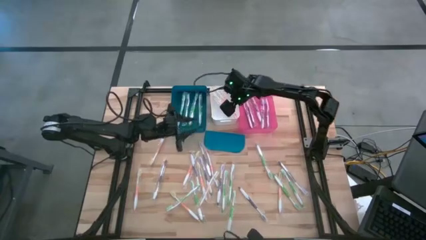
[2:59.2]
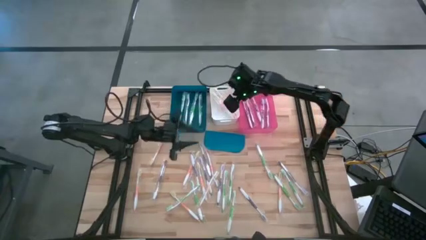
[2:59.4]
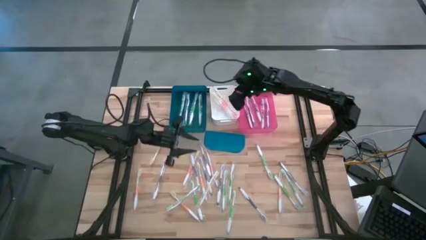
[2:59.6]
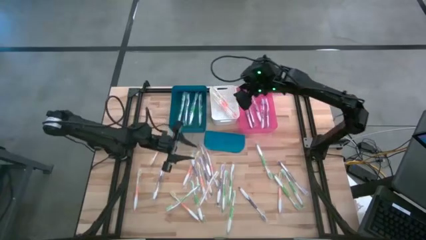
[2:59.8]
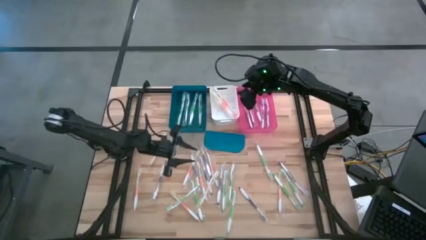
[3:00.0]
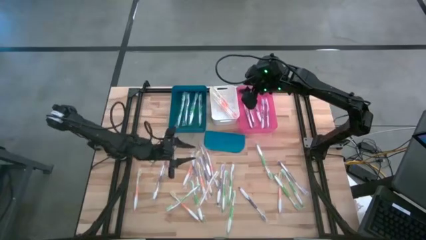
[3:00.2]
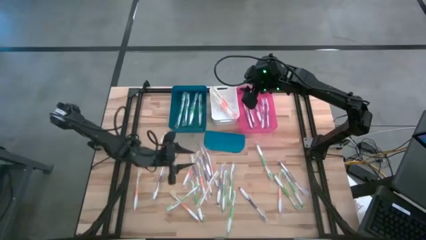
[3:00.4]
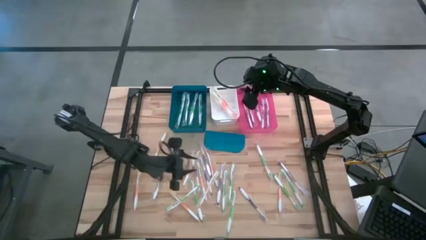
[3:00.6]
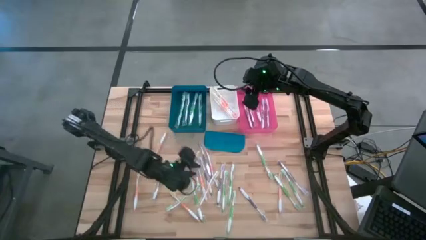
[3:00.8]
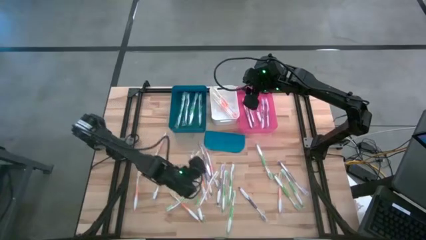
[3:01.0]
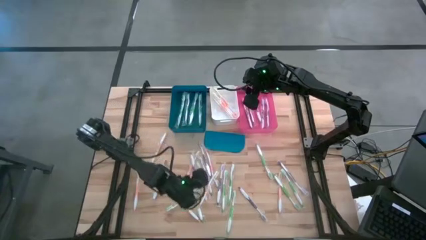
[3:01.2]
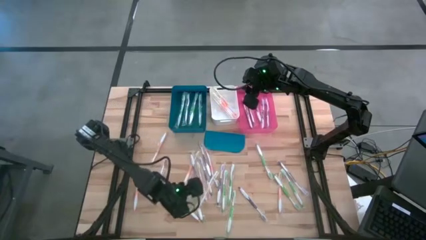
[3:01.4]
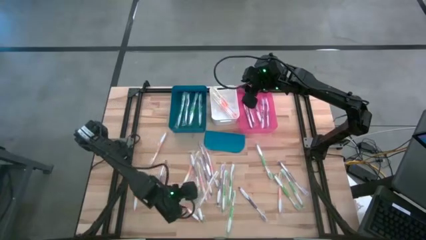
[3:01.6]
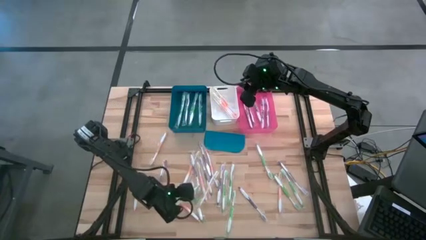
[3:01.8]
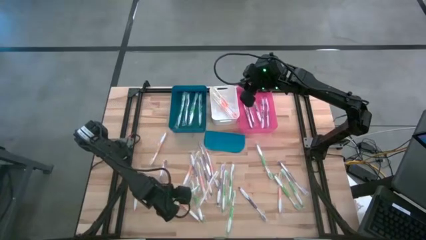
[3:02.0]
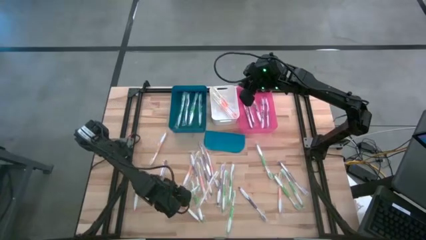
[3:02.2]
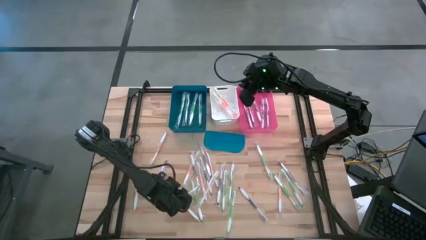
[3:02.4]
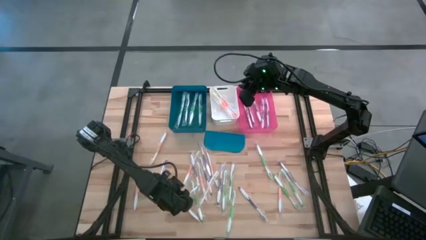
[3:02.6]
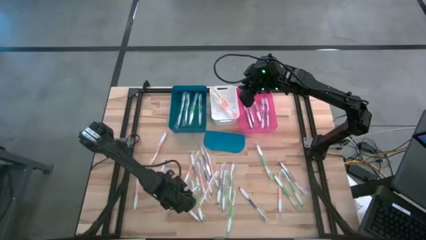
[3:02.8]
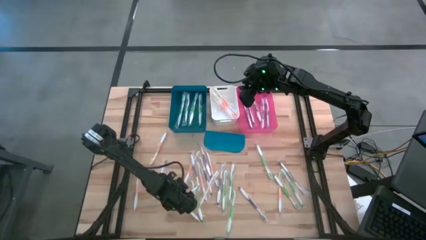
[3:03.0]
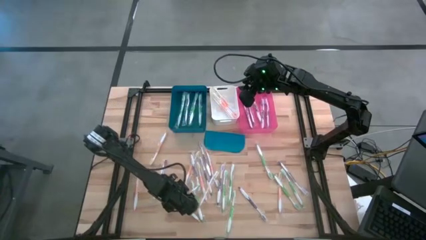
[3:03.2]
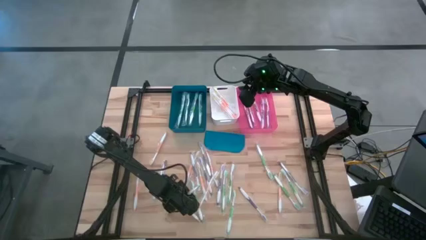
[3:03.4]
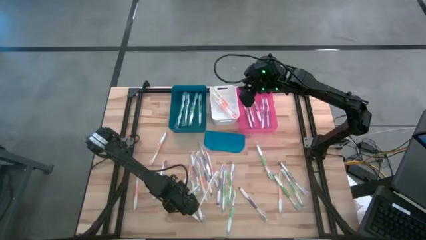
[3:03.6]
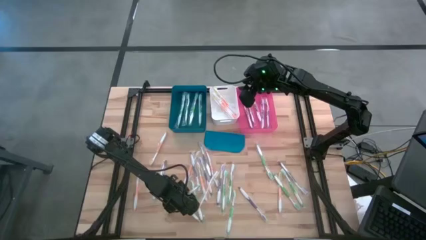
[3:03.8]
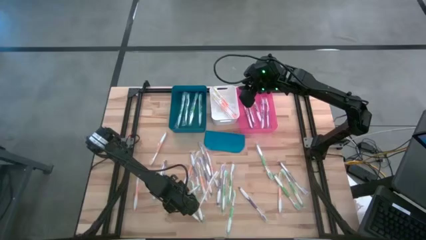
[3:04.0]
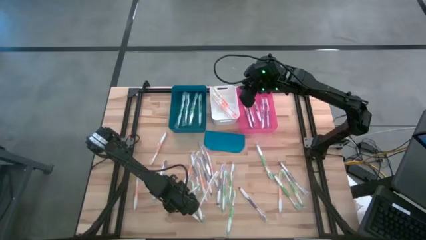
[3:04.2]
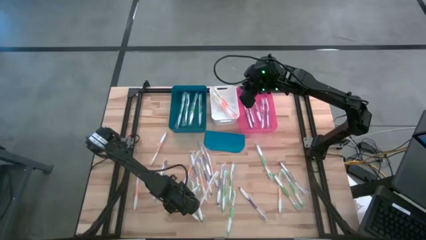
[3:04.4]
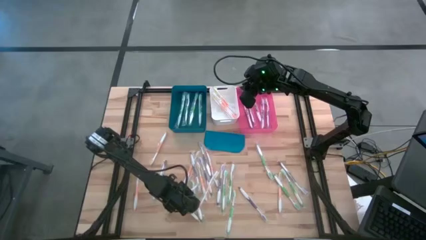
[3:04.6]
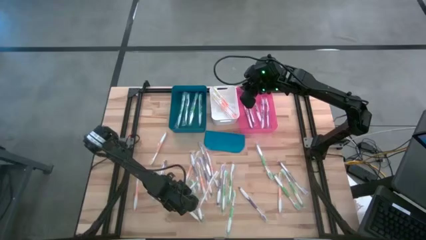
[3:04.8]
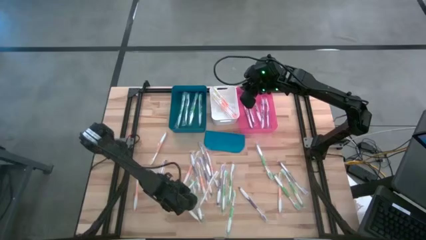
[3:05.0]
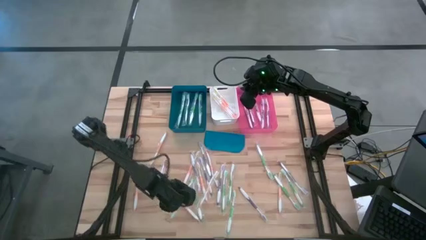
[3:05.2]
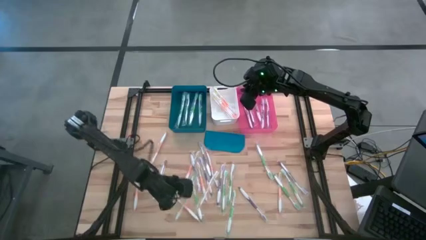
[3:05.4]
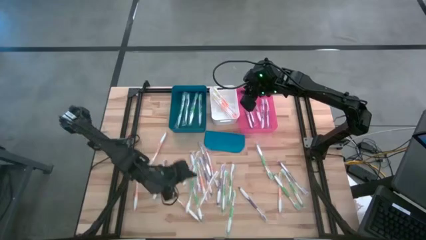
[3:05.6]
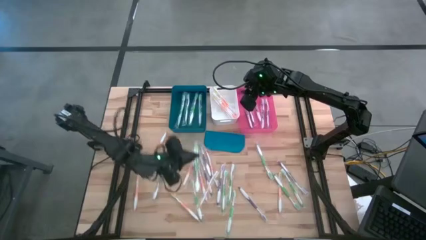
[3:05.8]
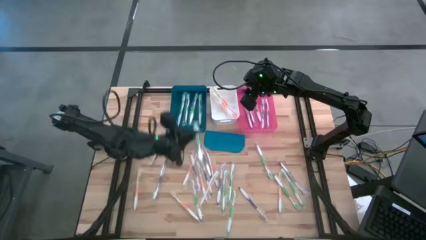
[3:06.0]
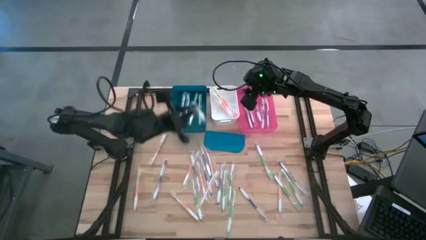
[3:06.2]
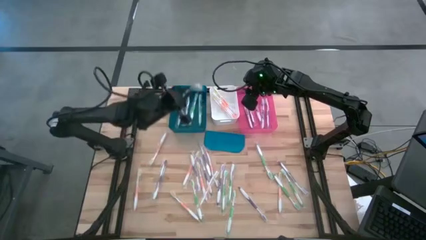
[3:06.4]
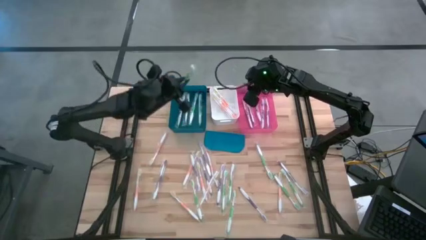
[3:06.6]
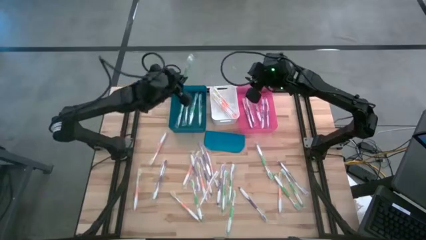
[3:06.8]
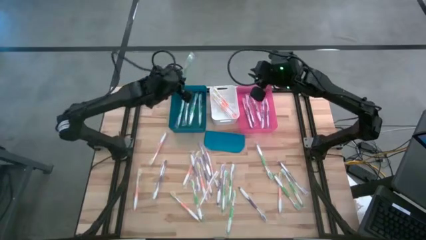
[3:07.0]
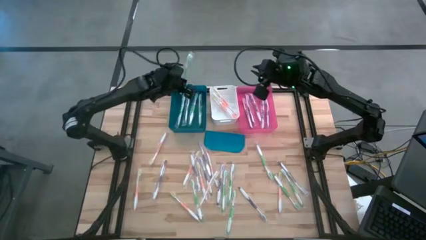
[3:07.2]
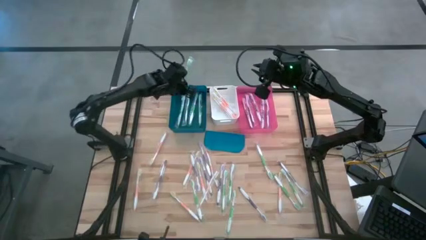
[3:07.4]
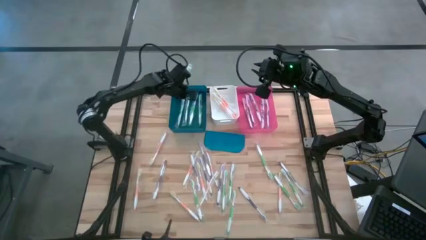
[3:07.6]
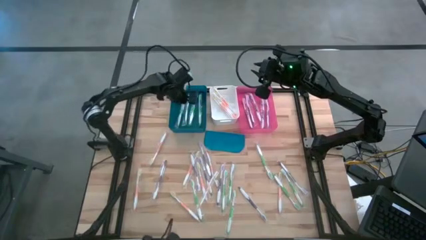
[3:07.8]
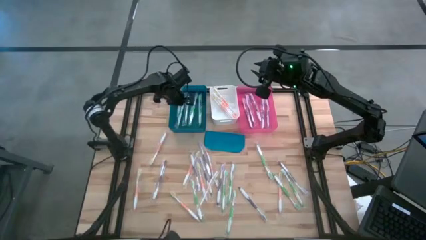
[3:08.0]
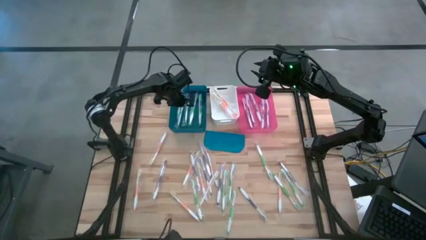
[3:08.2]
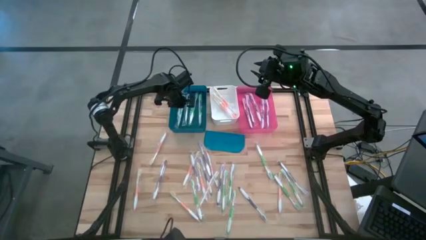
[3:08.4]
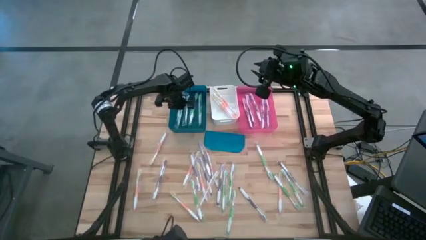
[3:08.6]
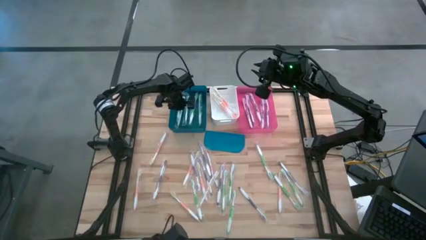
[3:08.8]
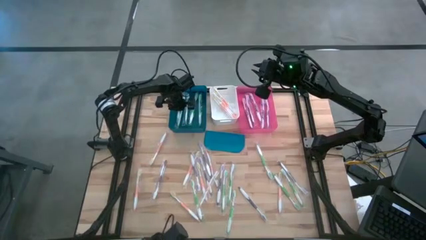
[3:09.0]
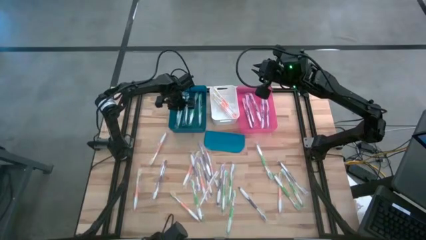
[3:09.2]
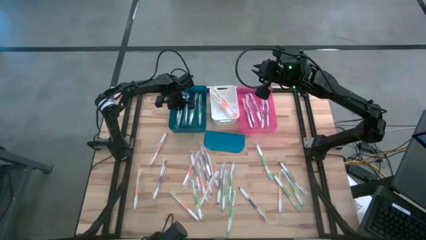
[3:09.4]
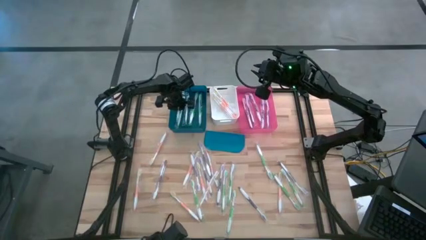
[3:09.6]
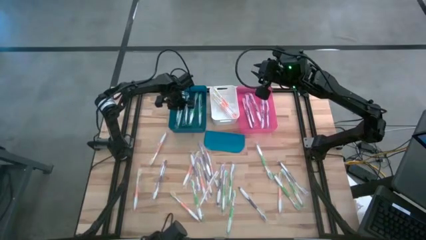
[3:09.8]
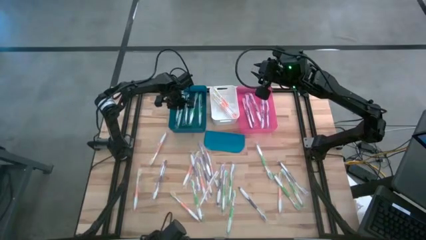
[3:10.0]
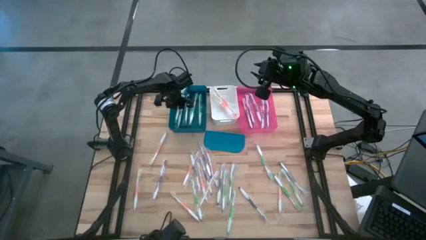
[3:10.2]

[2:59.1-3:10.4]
Task: Pick & Place Toothbrushes
Put the green toothbrush into the blue bin

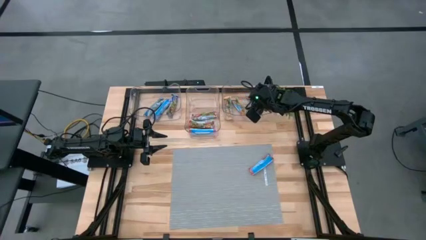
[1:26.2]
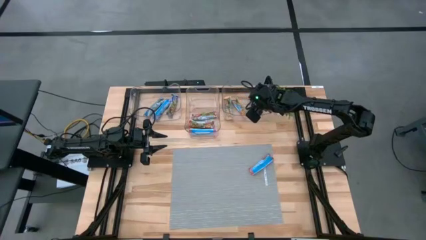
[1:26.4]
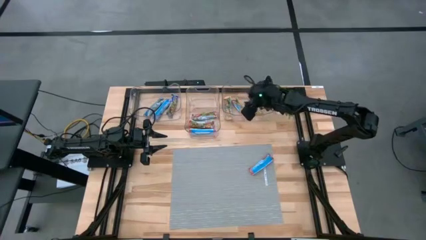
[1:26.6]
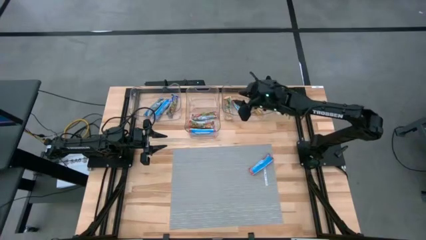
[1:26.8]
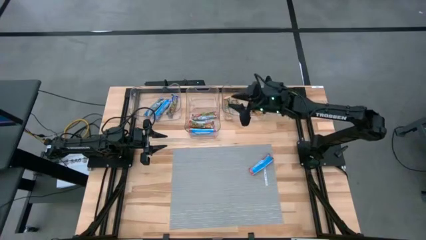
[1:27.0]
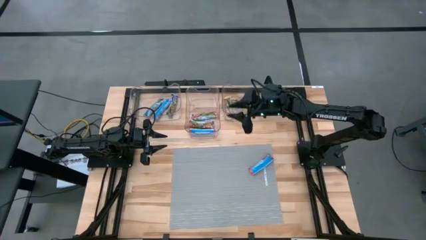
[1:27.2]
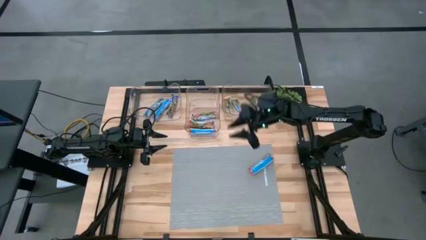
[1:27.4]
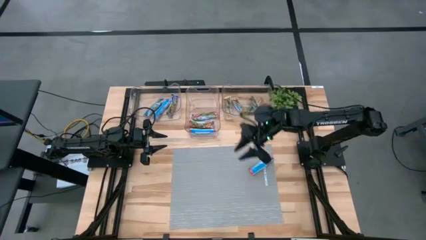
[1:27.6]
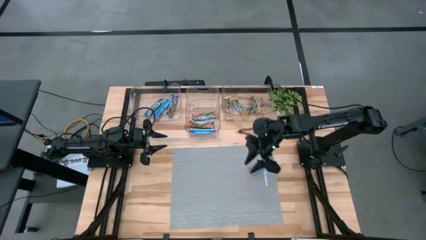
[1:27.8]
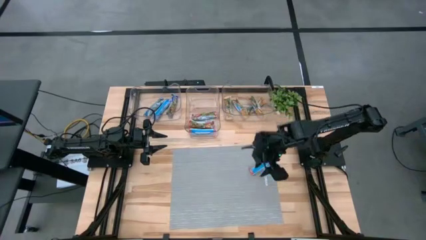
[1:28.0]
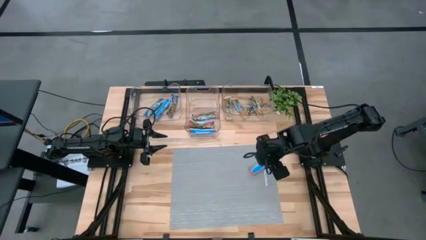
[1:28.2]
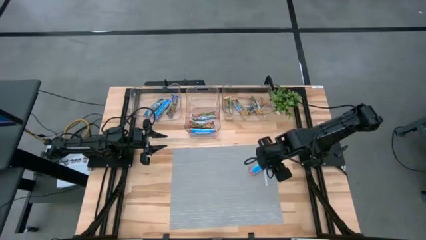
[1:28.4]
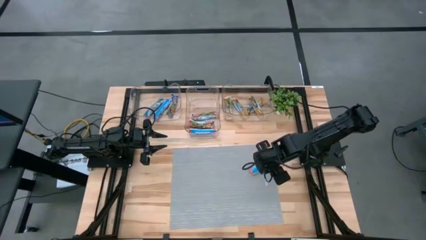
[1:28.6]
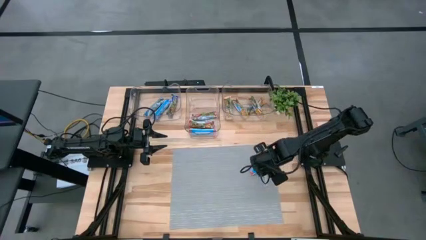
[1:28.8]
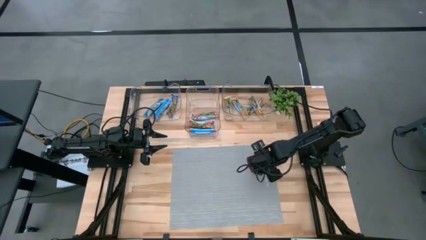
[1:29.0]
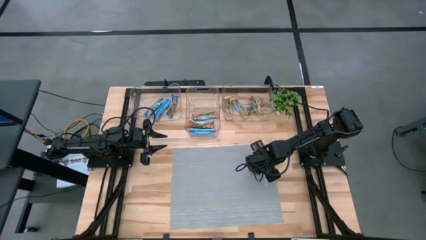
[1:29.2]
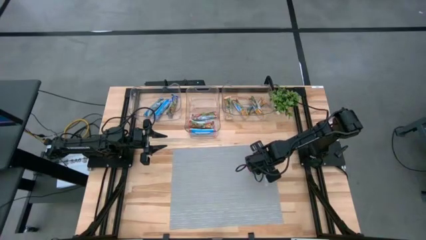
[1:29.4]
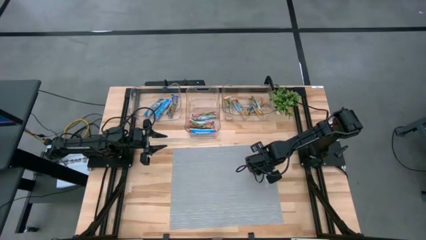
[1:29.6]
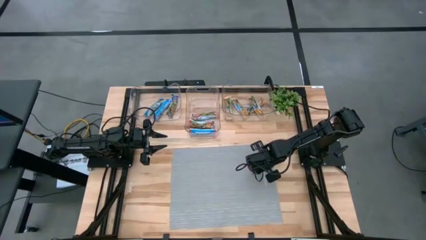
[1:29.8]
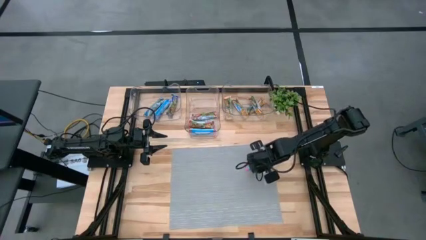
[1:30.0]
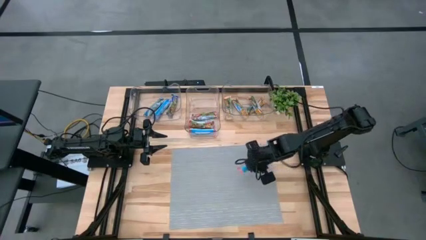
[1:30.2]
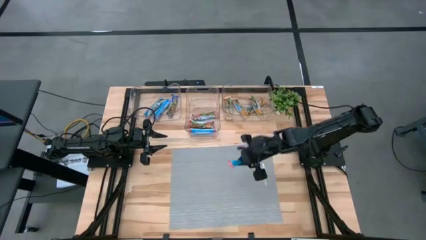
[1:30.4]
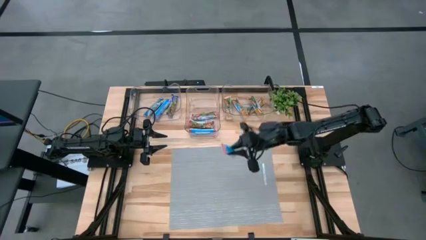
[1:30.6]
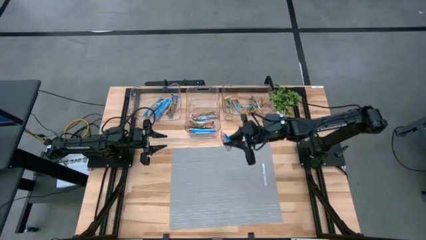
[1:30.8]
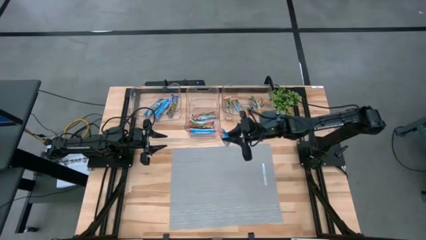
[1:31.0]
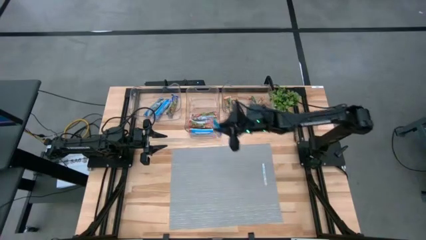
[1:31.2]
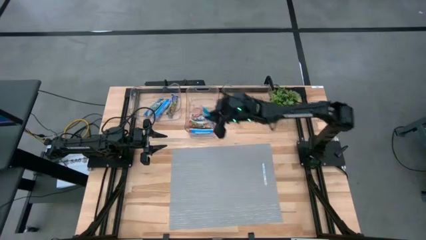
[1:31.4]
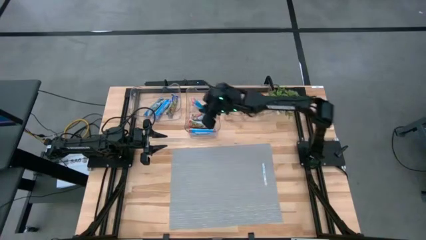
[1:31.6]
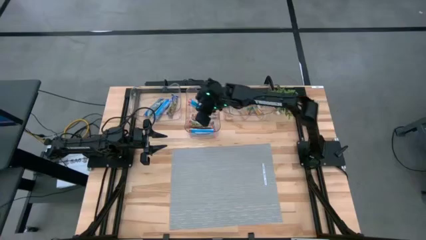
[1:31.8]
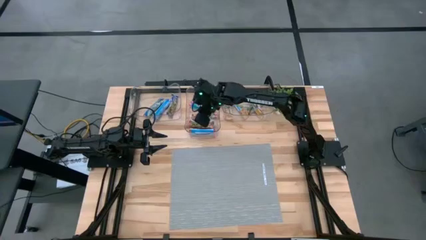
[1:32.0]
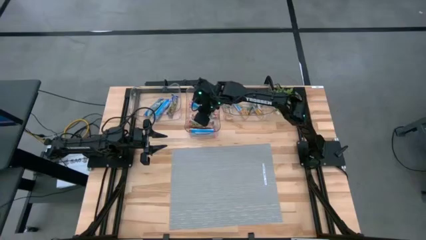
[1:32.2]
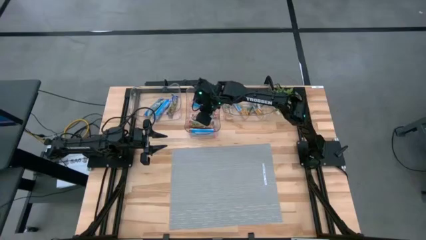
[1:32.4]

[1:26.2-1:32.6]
Task: Pick and place Granola Bars by type
Put the red granola bar into the middle transparent bin
